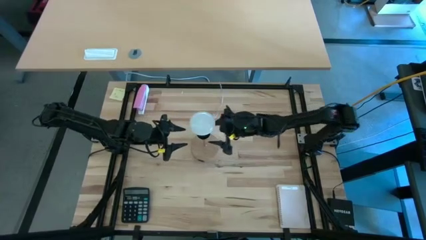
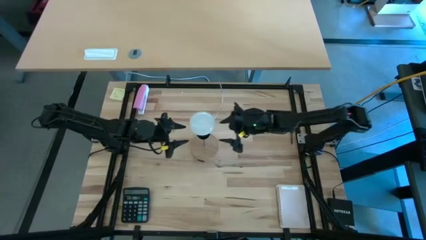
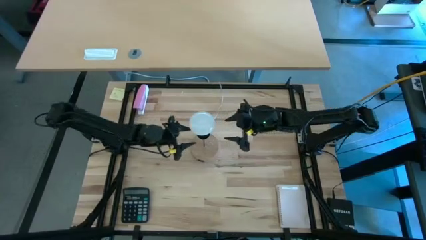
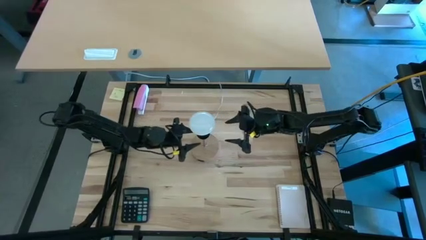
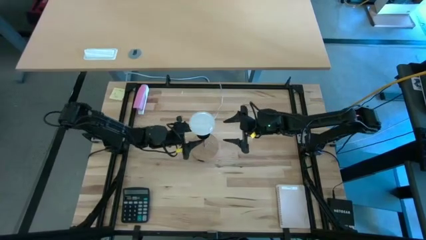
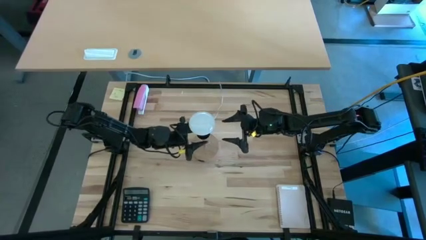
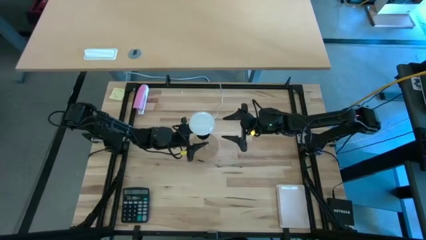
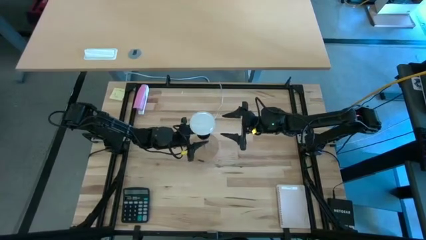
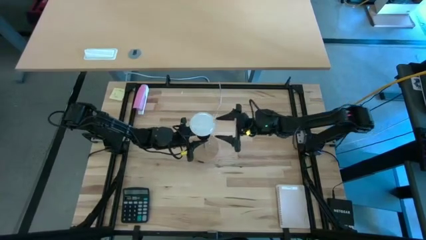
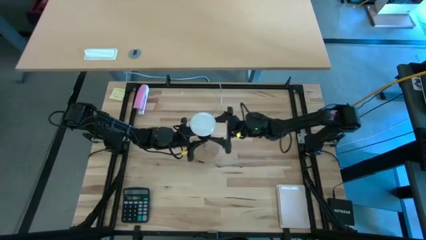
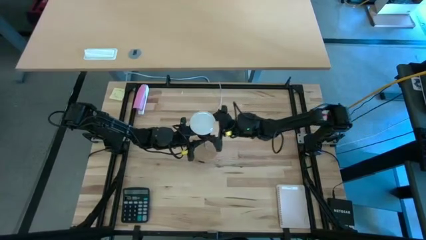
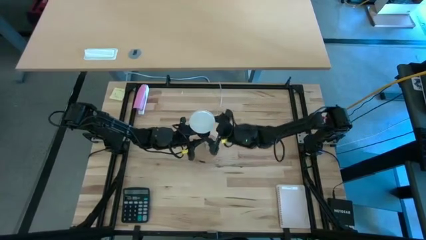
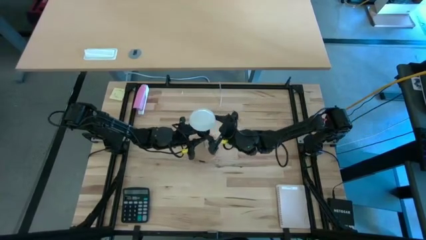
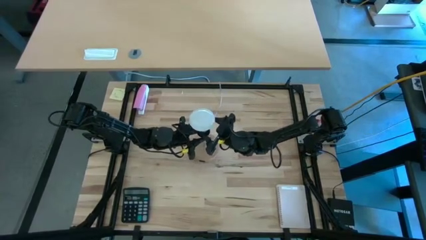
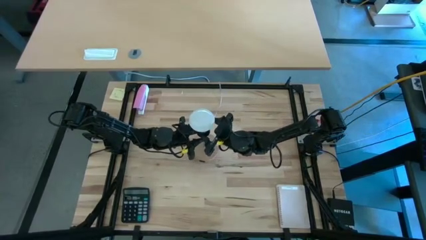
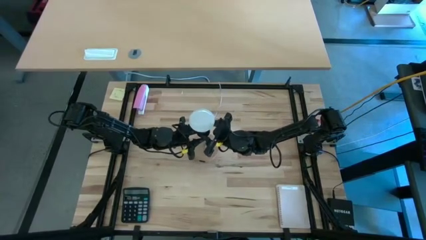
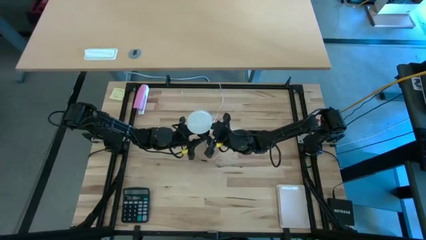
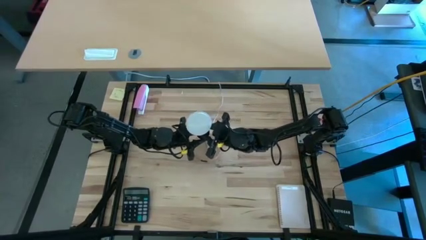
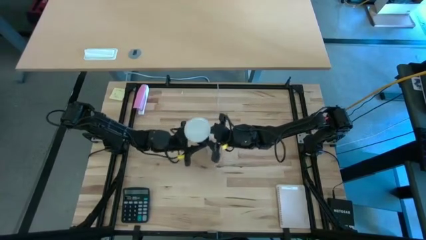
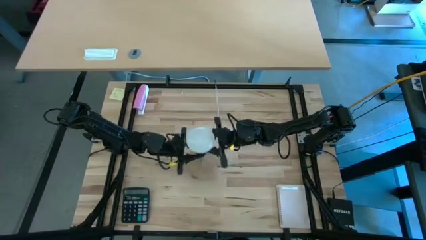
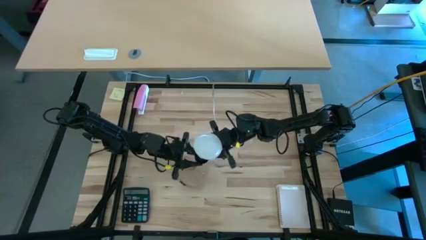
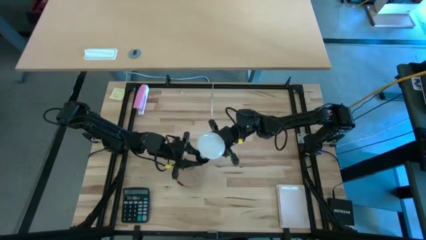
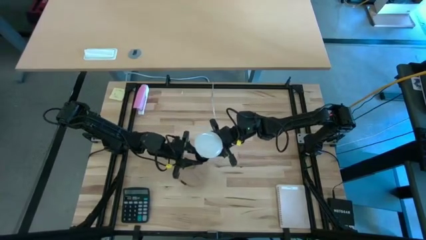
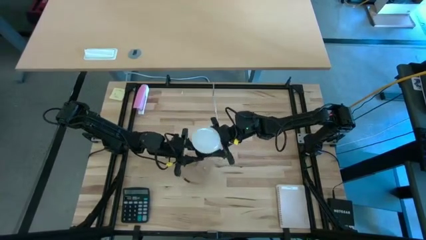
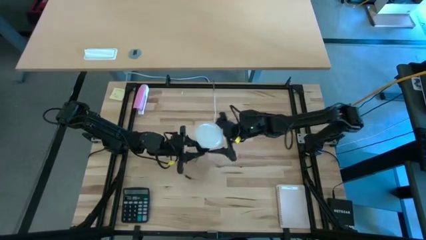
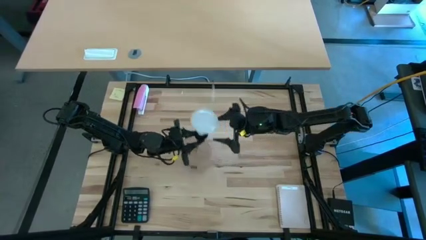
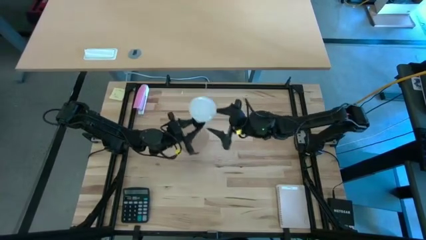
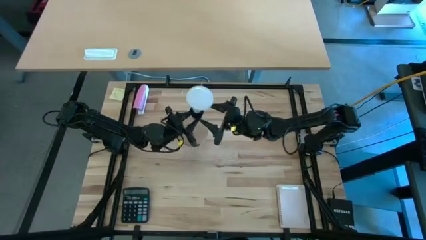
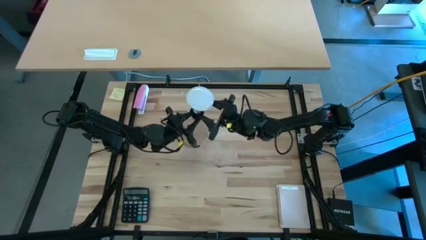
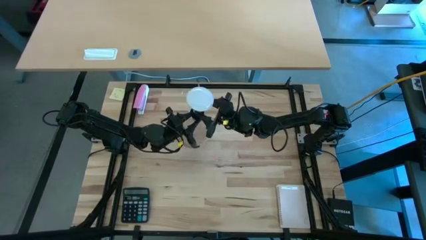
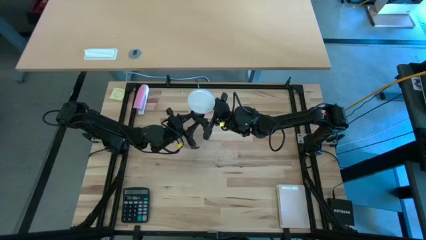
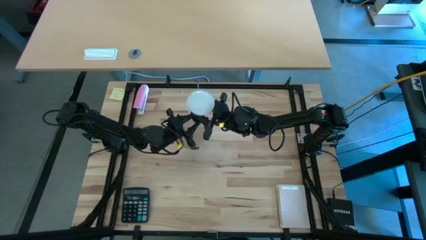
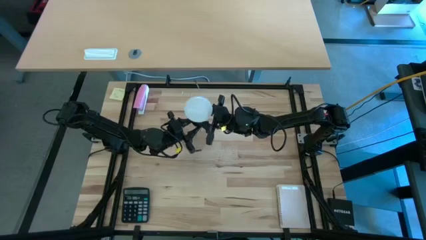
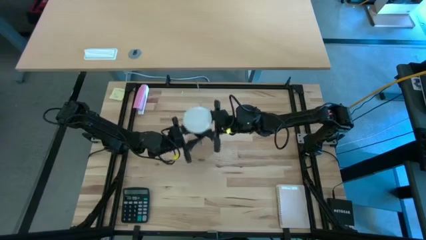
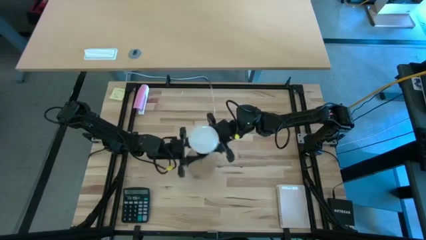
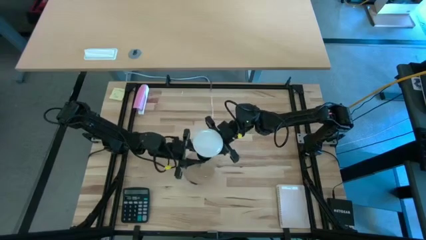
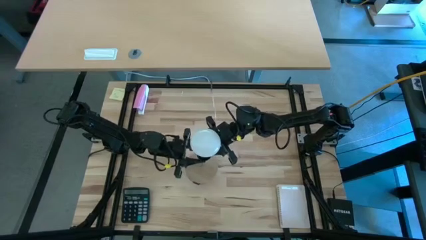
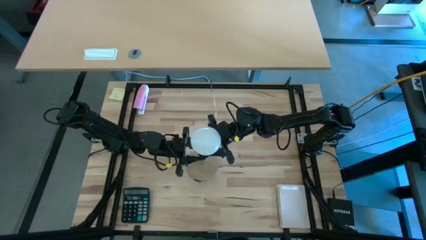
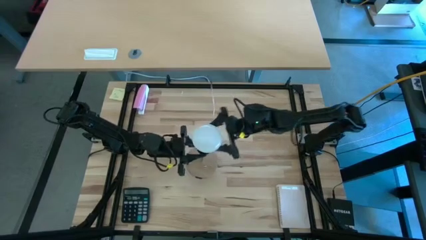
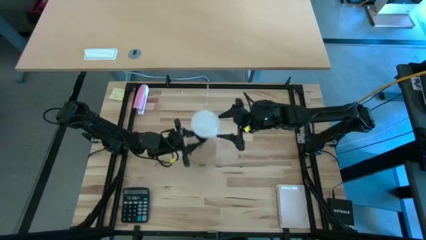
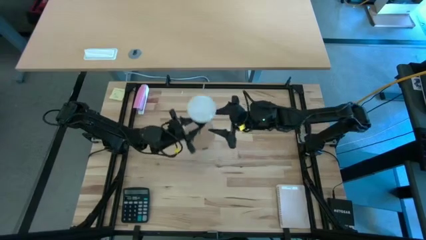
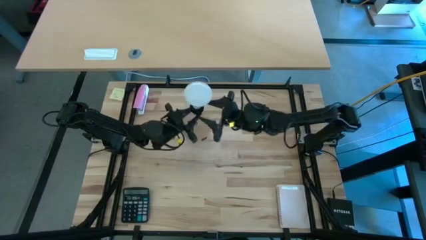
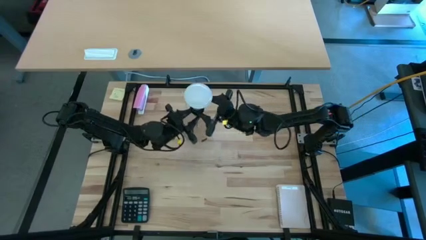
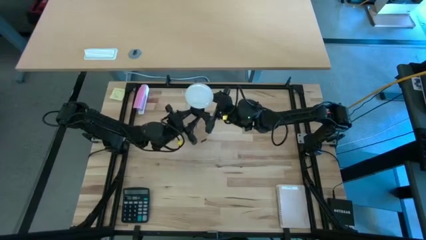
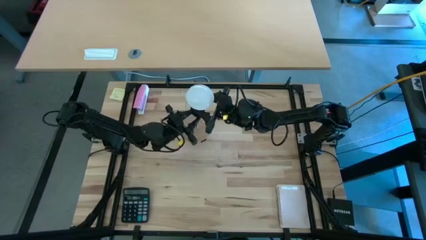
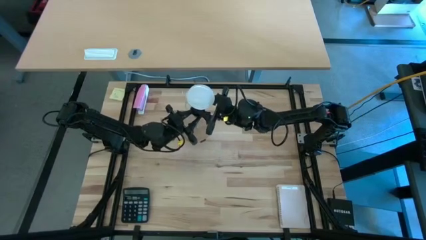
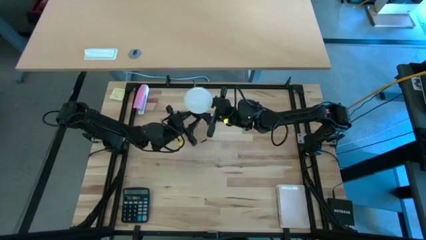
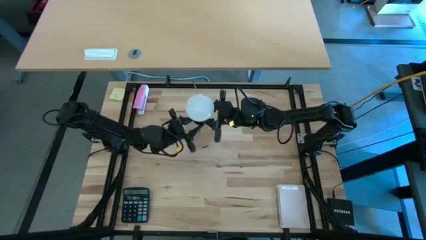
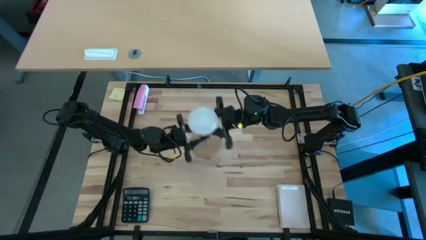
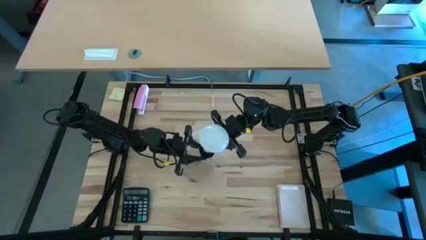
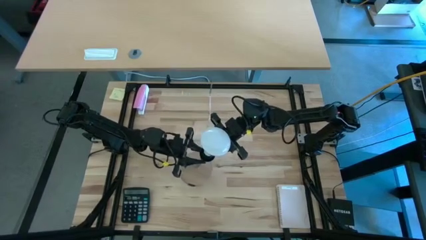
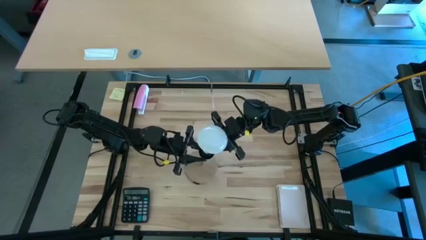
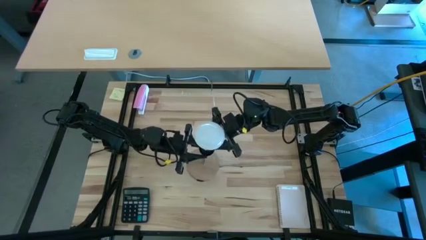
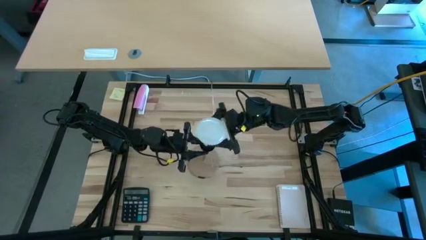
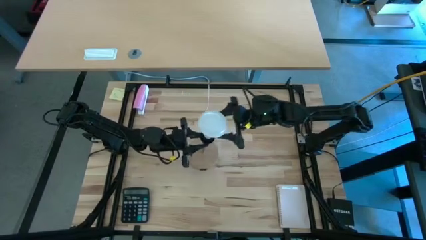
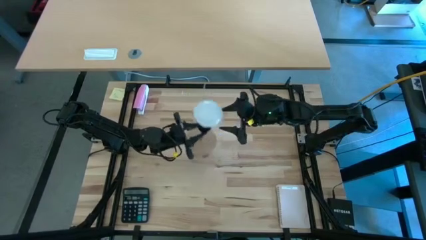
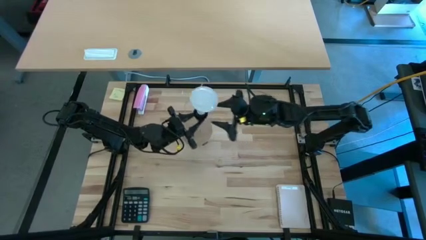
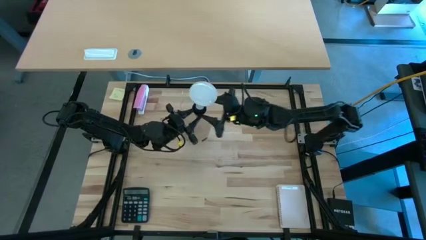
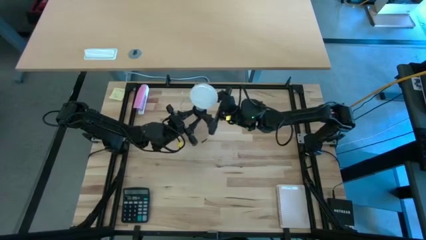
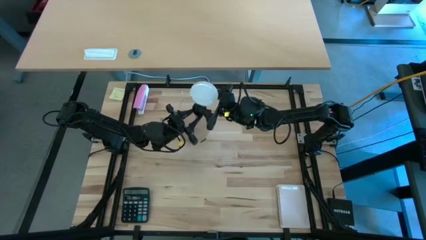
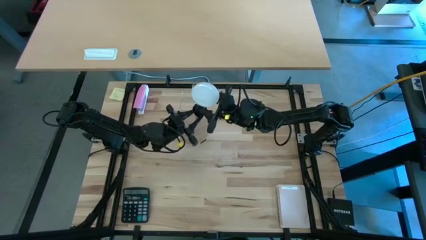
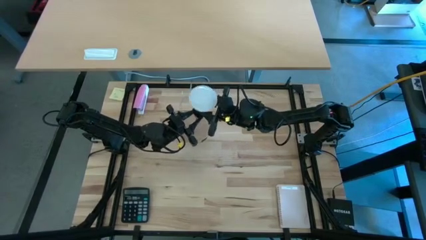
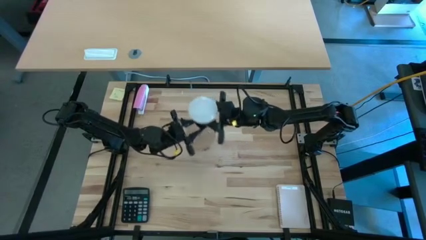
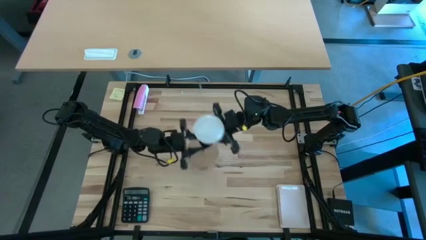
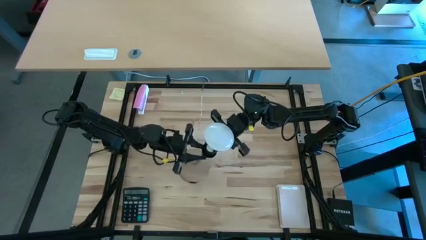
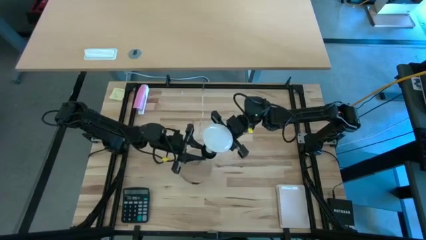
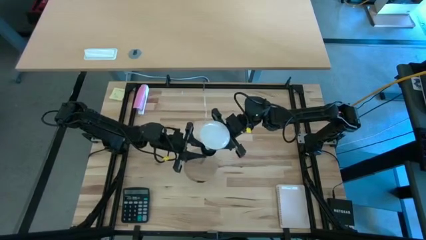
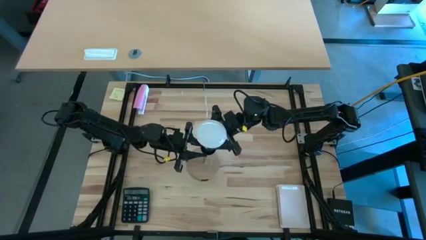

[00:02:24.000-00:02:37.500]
Task: Screw lightbulb
Remove the lightbulb from the desk lamp

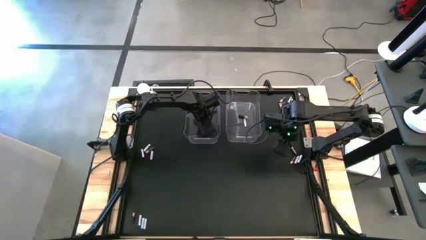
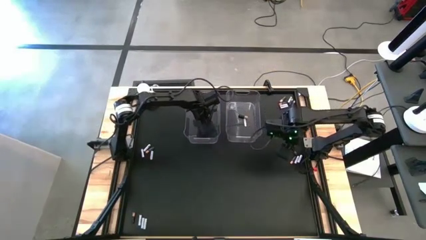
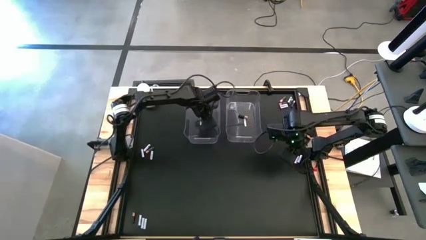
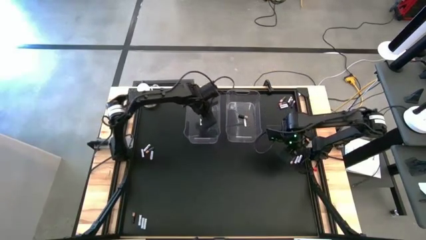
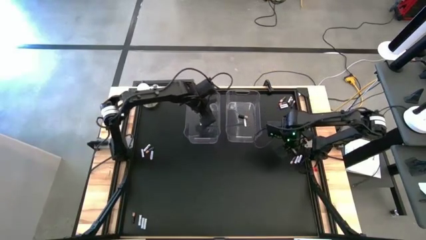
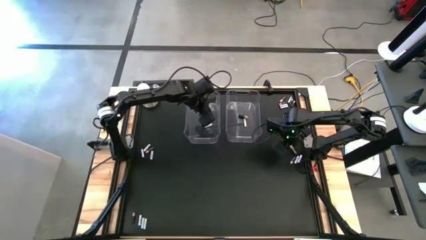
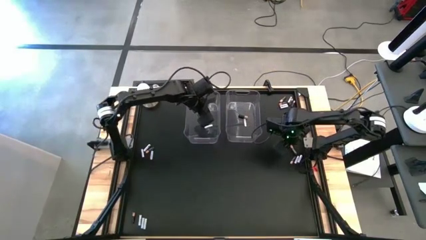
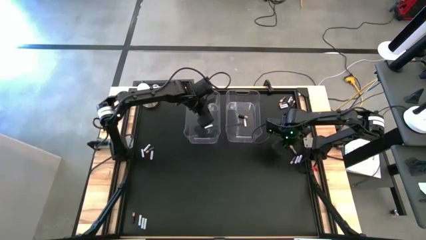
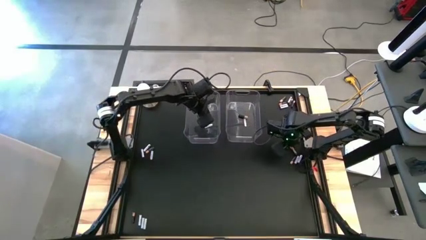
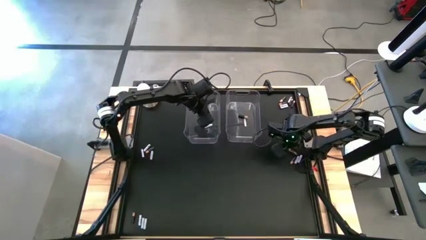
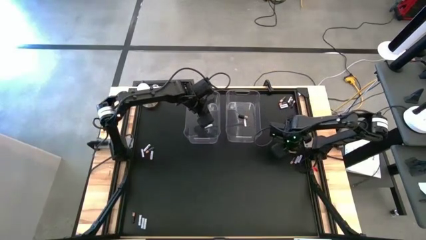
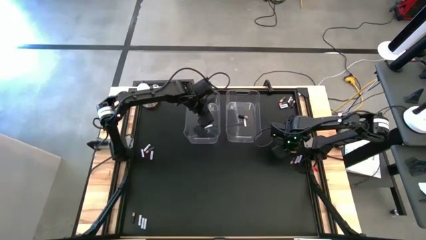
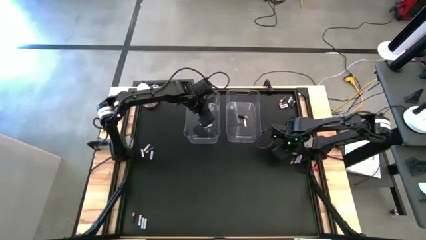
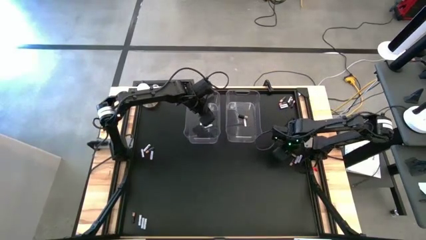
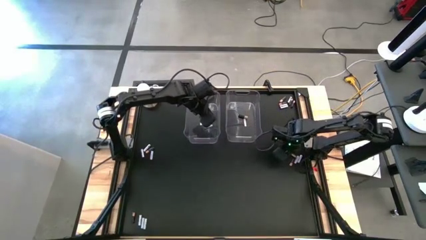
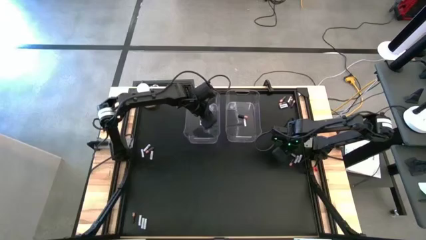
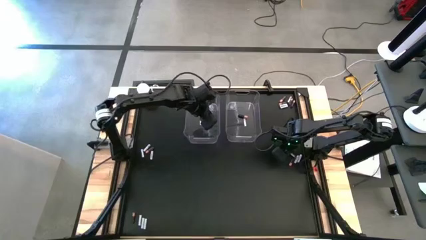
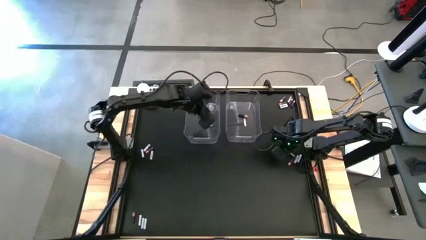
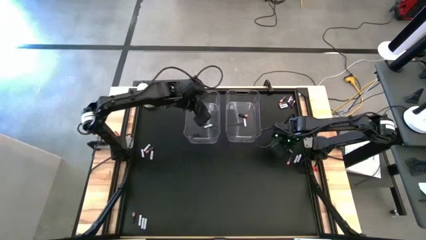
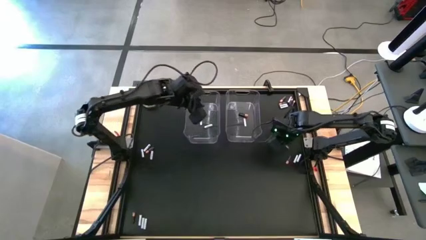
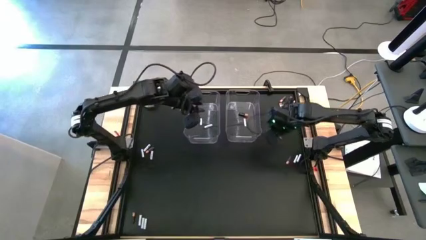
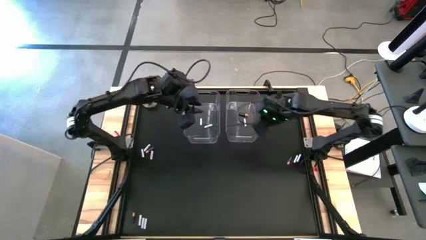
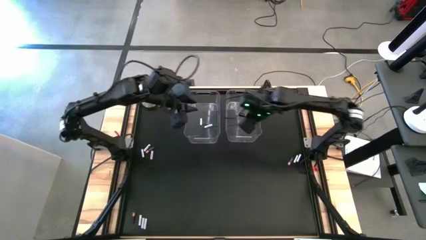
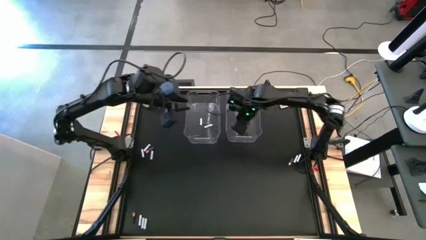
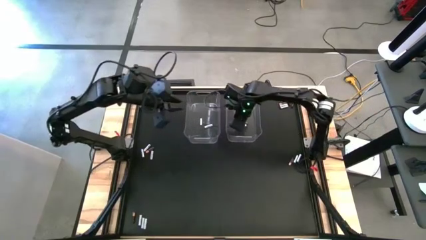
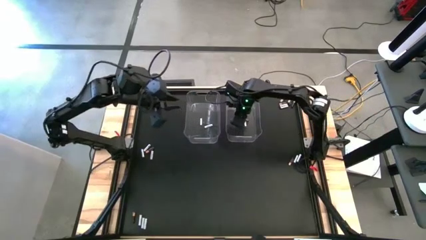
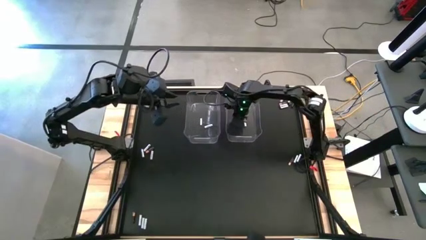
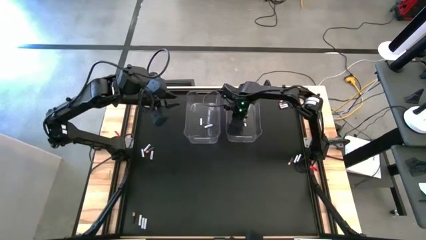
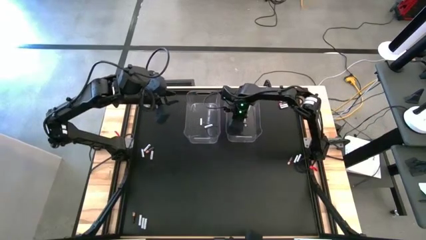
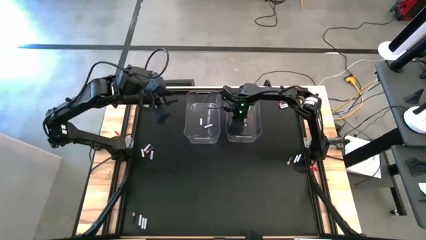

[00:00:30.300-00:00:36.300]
Task: Sort batteries
Put the brown battery into the right transparent bin
